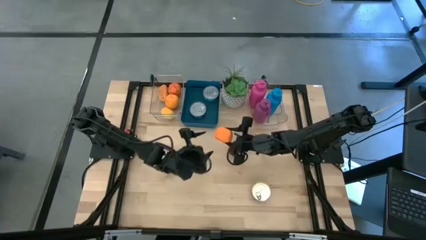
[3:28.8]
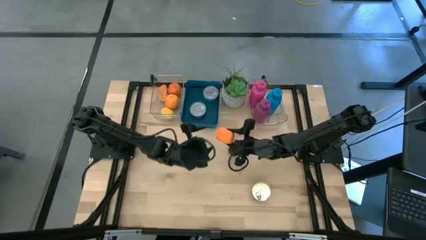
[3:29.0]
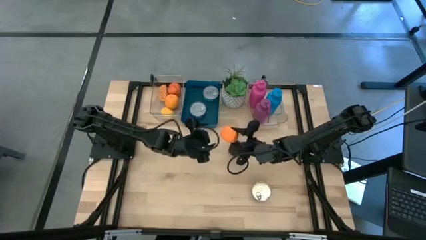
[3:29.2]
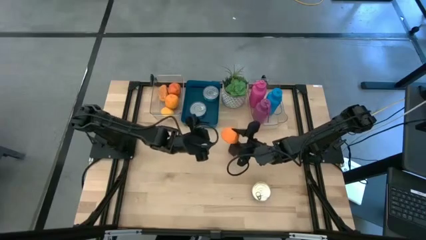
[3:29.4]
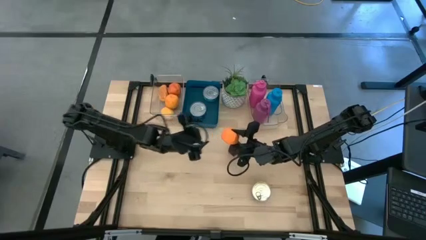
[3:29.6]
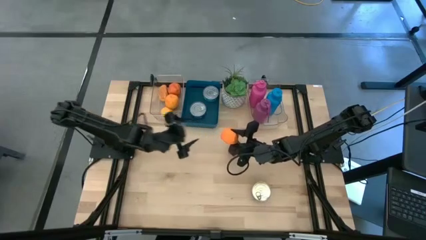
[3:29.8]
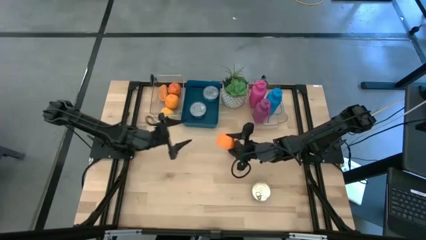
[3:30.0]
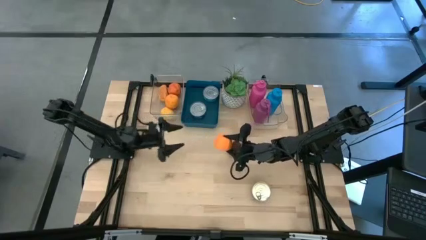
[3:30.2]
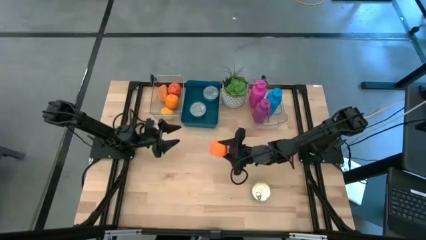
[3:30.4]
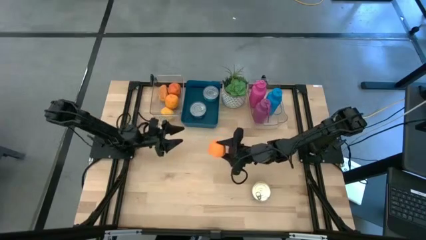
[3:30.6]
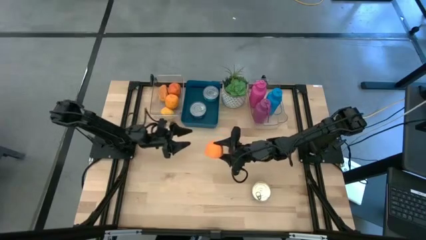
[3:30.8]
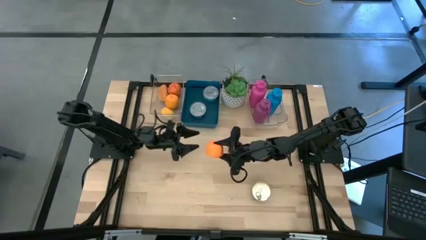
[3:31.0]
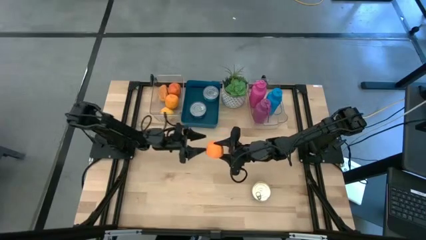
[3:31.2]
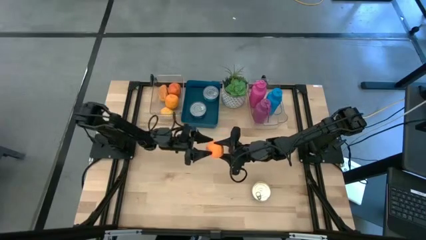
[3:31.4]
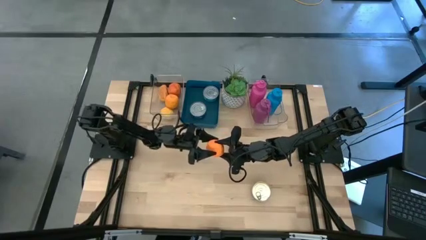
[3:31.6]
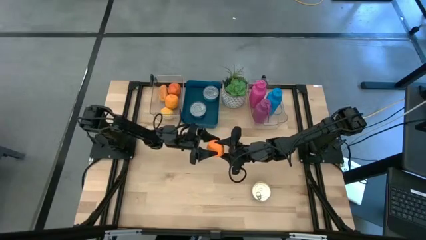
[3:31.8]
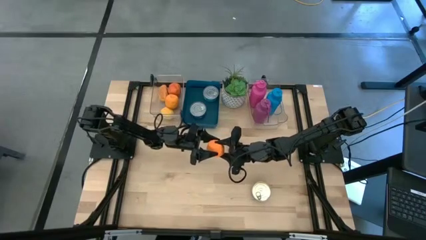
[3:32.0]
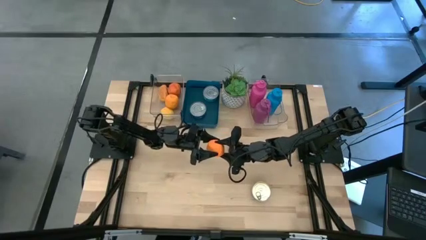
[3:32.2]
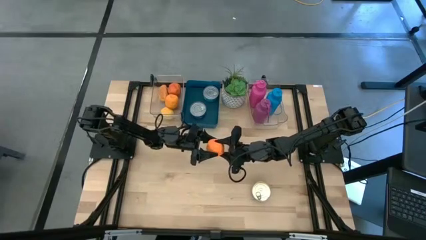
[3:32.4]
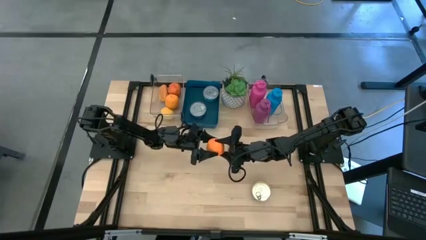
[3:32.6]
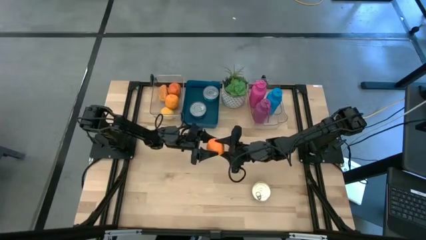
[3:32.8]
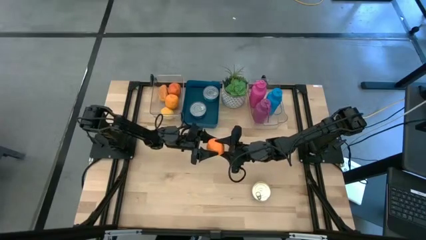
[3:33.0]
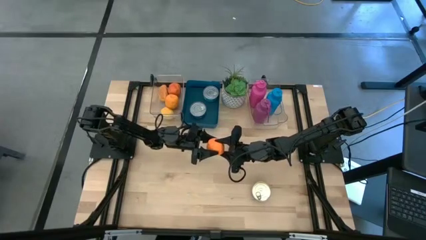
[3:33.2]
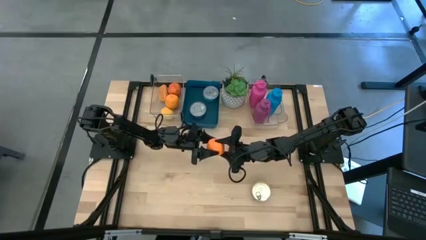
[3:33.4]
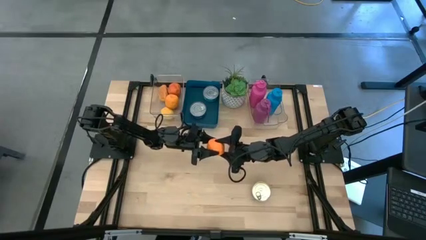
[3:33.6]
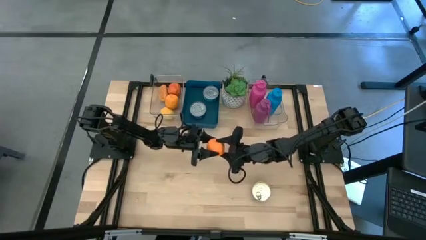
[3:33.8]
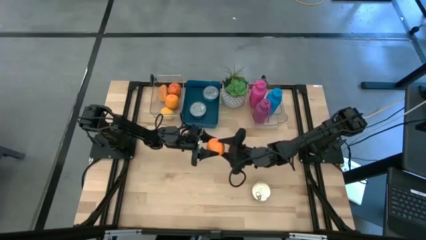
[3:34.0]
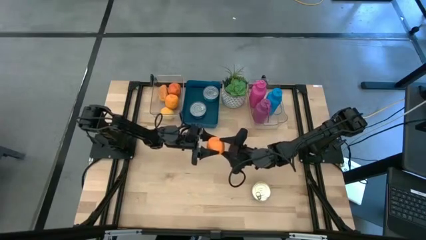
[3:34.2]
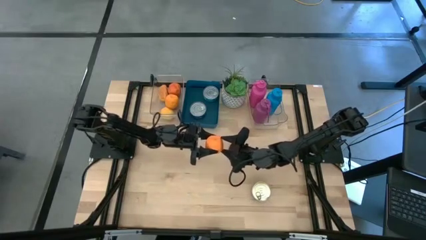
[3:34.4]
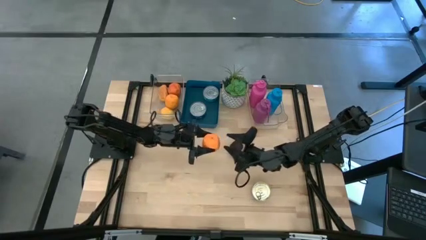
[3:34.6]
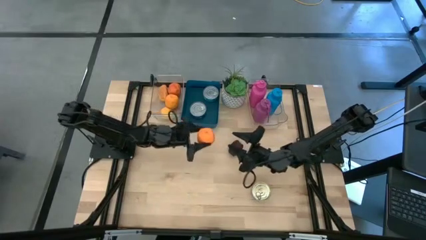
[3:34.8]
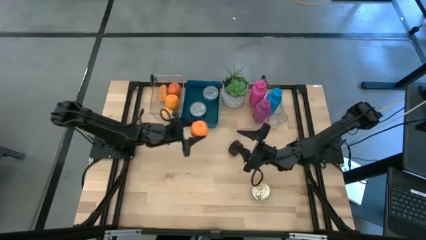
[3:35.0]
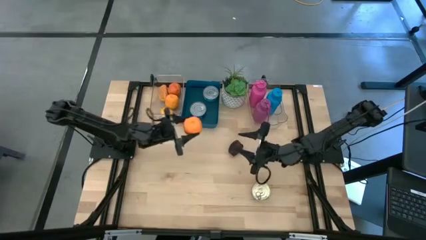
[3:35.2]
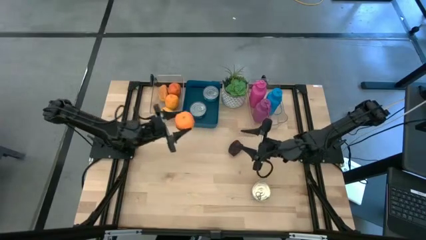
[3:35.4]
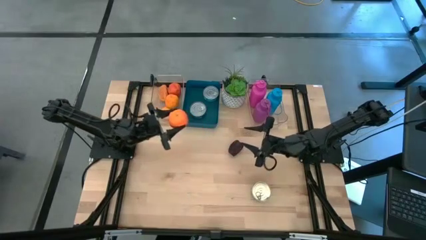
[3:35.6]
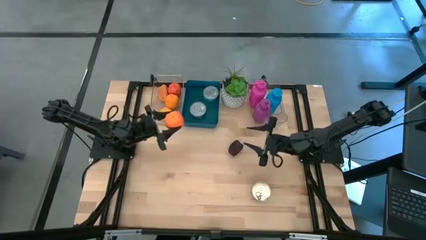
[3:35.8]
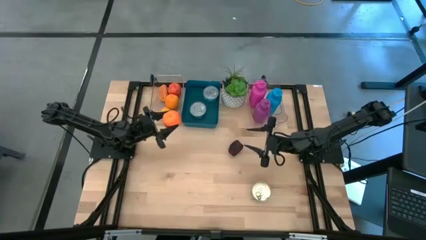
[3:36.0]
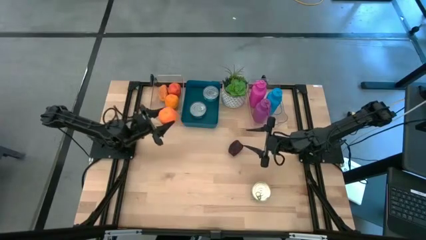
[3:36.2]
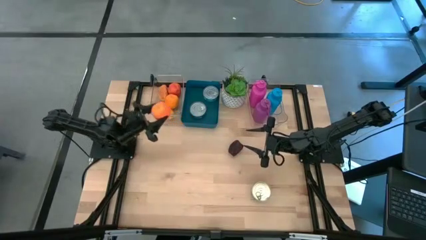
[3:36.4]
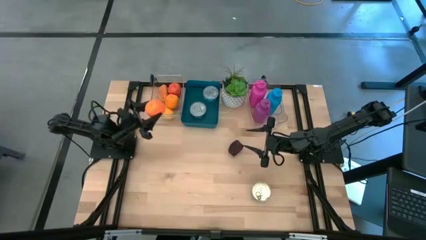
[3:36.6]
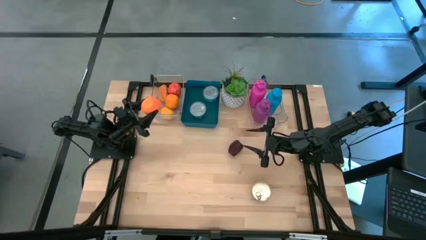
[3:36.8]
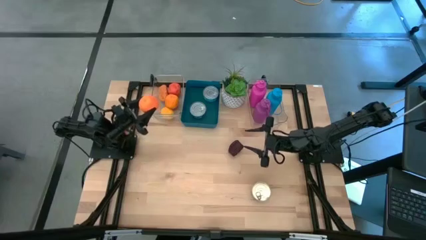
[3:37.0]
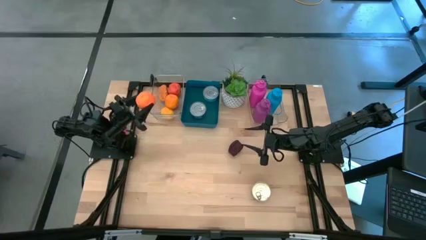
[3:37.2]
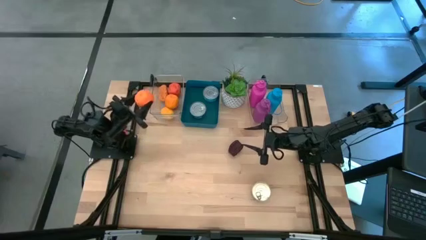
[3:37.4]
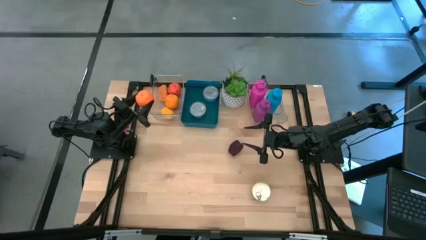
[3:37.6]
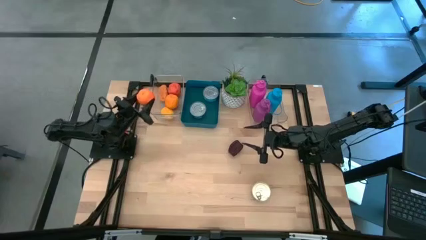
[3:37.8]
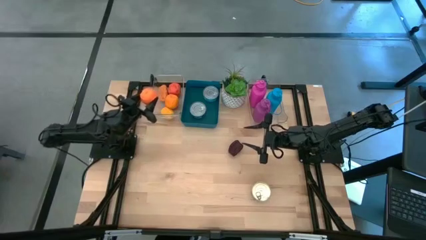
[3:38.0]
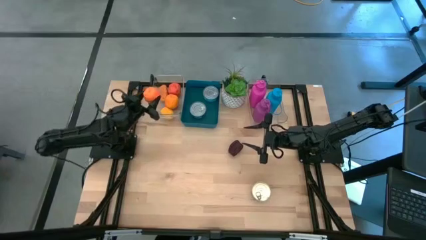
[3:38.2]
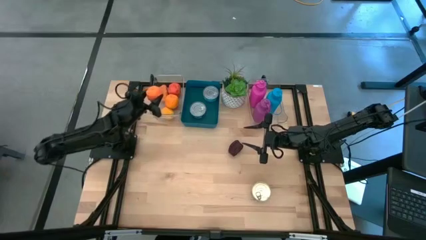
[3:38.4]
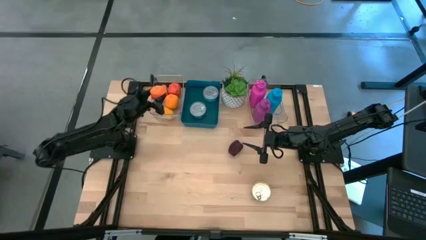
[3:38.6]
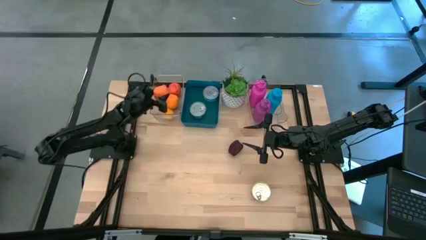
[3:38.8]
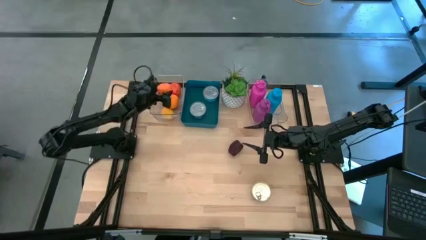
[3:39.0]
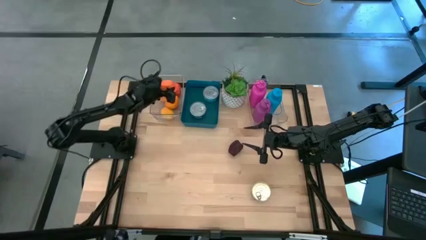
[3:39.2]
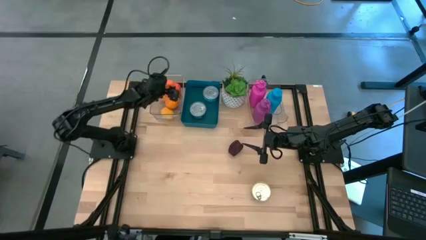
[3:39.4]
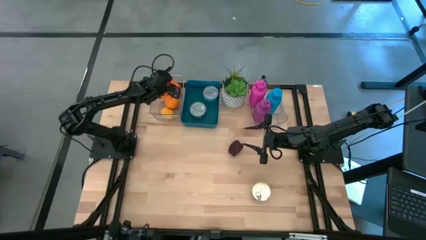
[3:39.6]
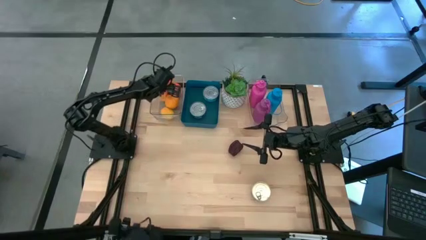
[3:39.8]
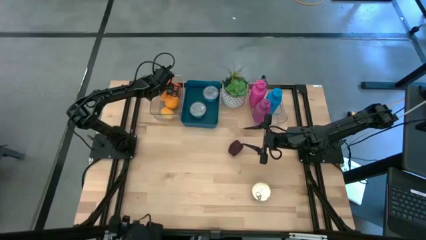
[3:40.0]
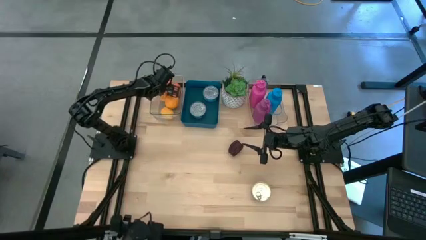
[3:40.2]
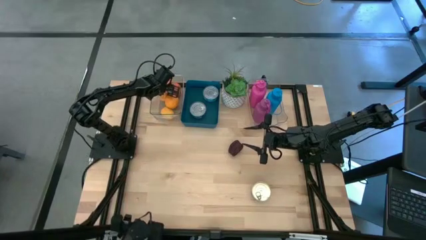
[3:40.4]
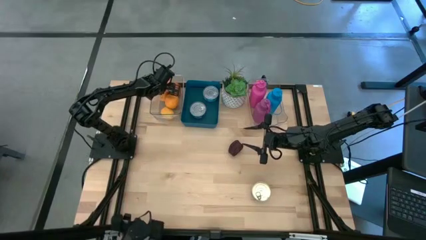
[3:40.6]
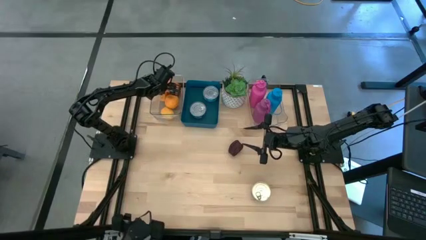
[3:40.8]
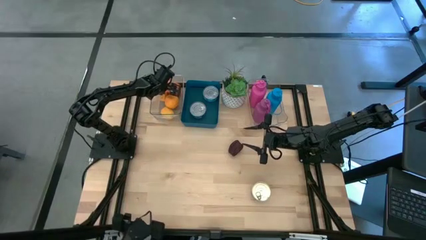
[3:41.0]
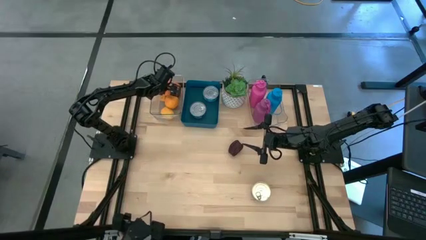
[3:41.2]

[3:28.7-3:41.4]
Task: Pick & Place Food Item
Put the orange into the left transparent bin

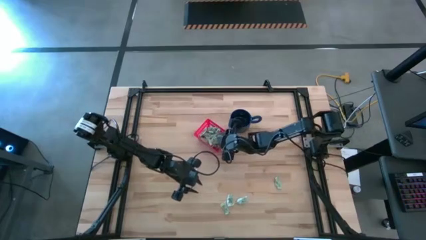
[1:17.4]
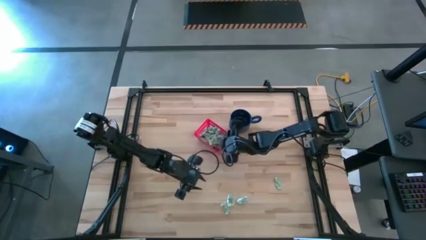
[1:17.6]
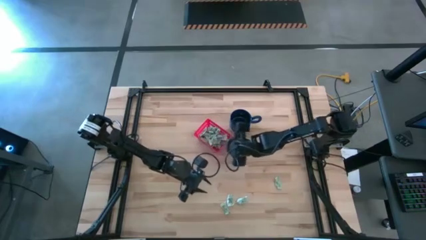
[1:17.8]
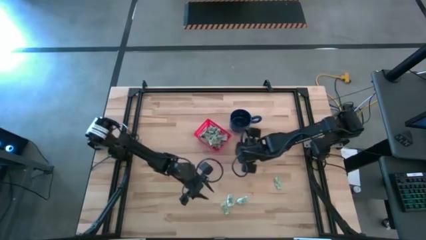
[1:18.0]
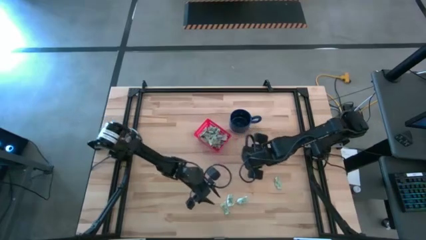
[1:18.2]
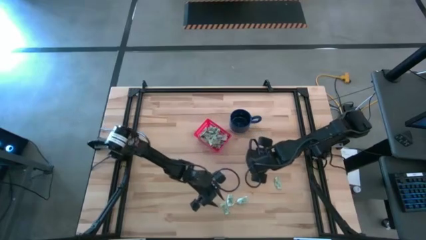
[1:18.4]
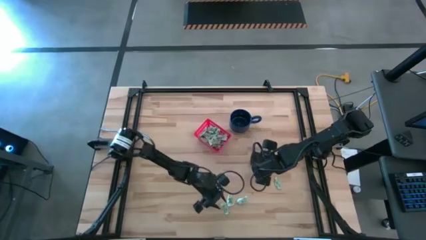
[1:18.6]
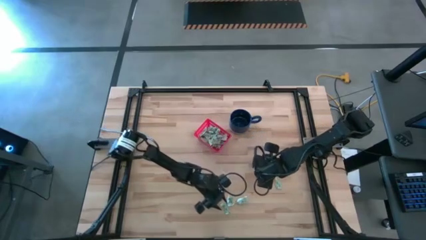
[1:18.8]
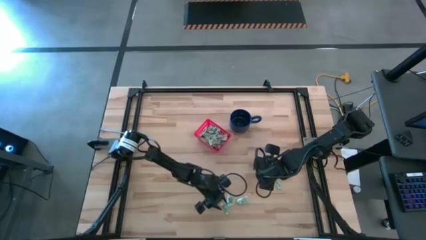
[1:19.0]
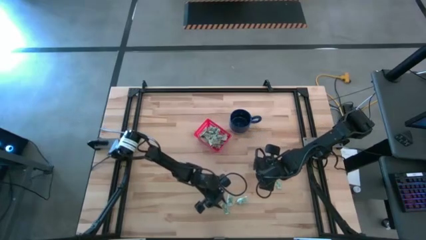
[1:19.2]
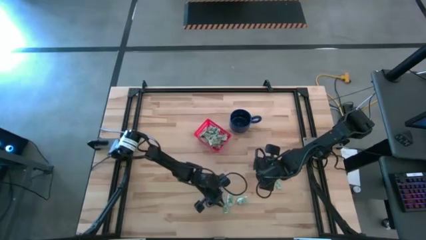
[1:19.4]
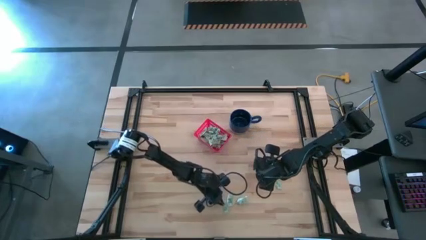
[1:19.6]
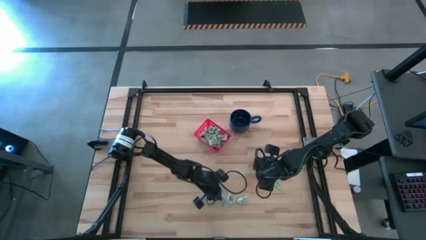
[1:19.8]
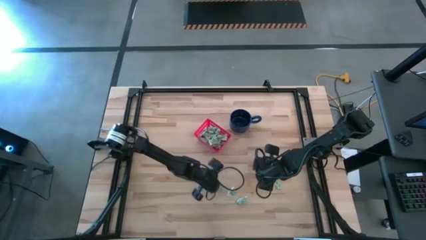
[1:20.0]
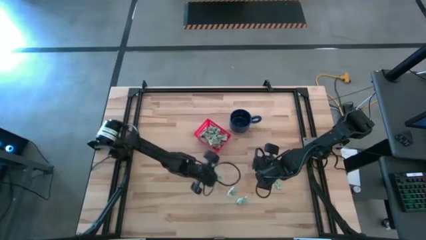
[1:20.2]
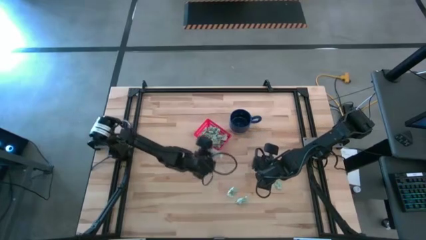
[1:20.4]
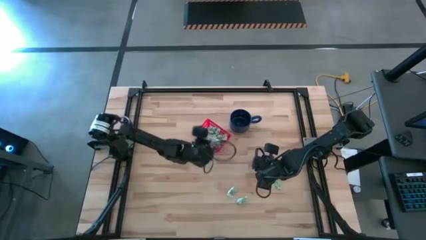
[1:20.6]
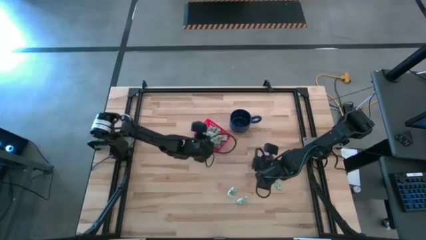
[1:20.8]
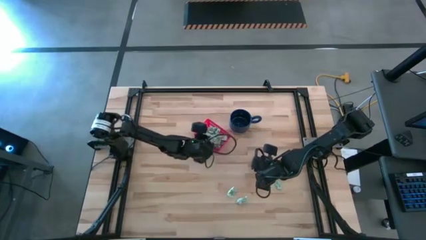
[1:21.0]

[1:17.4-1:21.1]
Task: Pick and place items into bin
Put the stevia packet into the bin

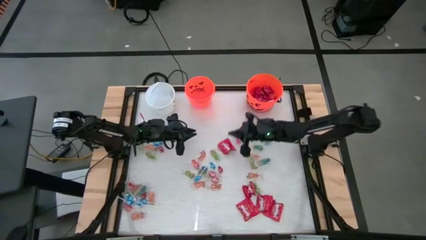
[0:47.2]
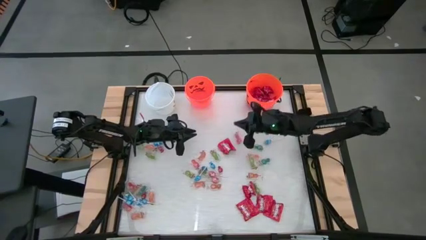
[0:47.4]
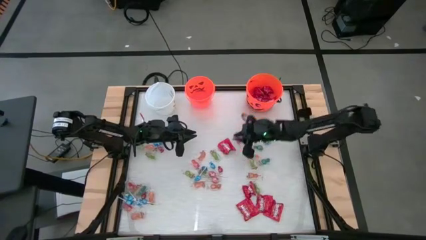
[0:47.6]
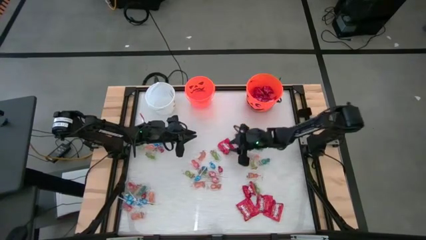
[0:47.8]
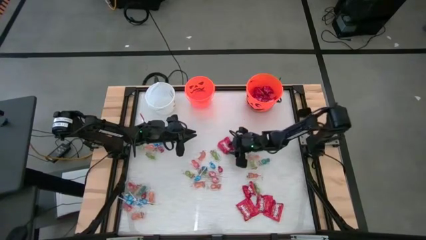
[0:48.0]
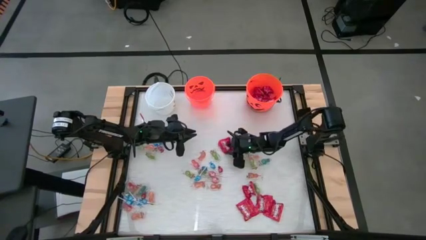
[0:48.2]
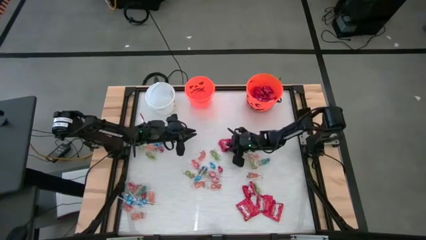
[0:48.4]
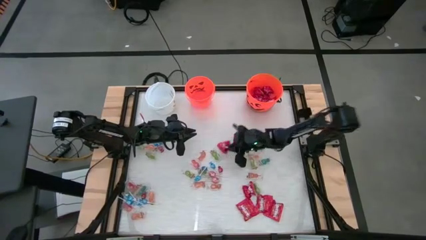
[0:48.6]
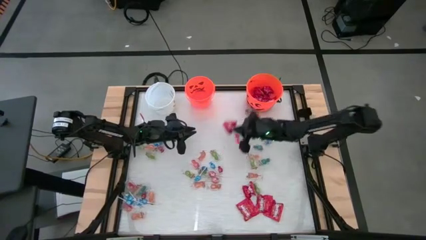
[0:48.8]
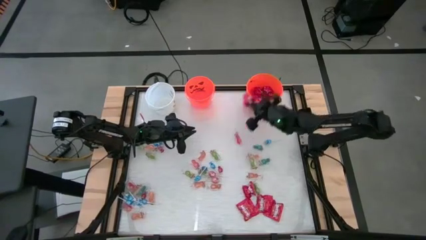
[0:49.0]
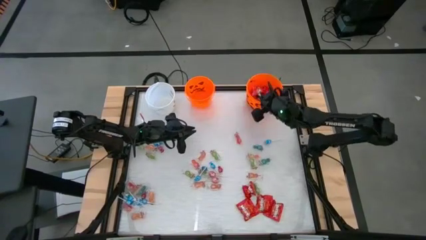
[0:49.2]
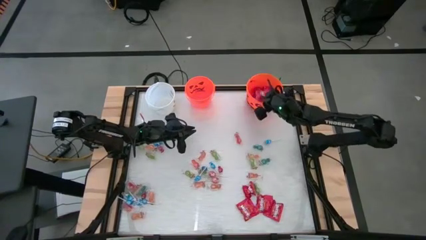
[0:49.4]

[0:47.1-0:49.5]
Task: Sort candy by brand, put in halloween buckets
Put the red candy into the right orange bucket
